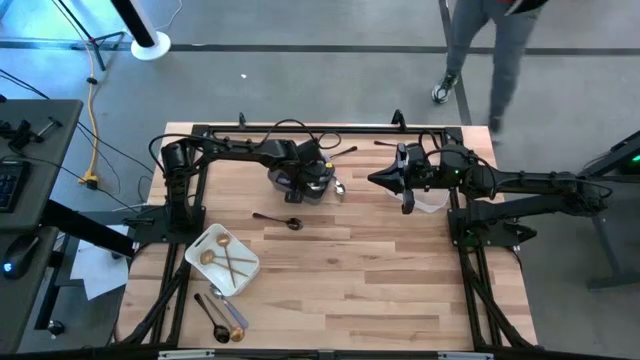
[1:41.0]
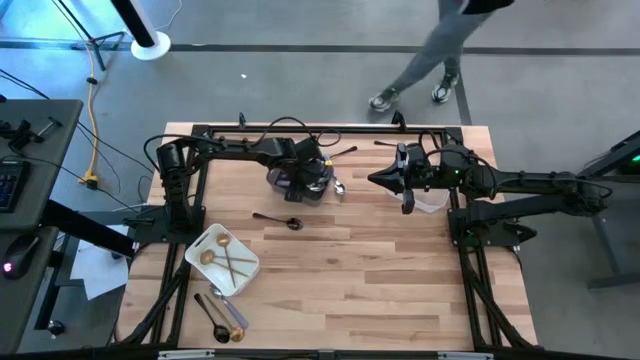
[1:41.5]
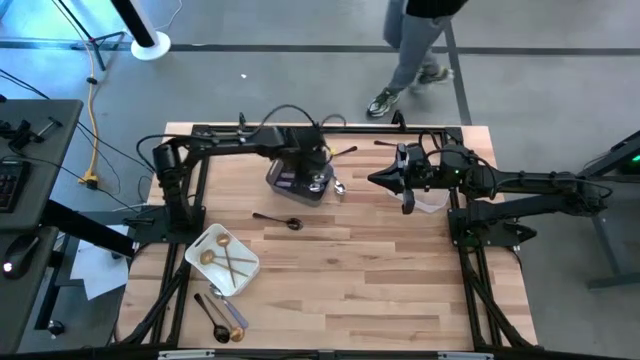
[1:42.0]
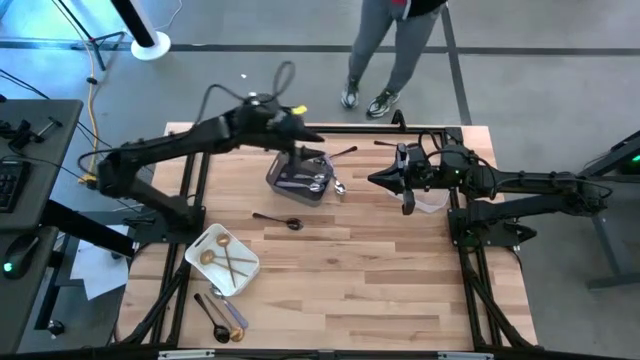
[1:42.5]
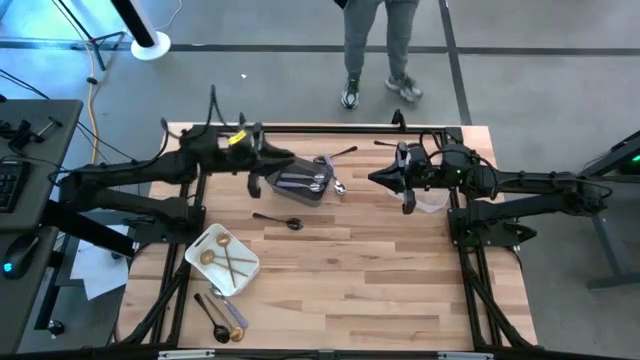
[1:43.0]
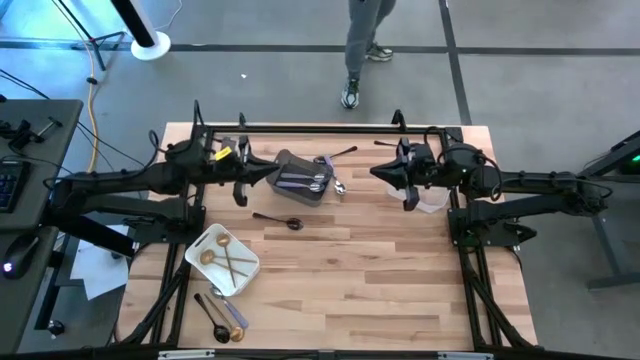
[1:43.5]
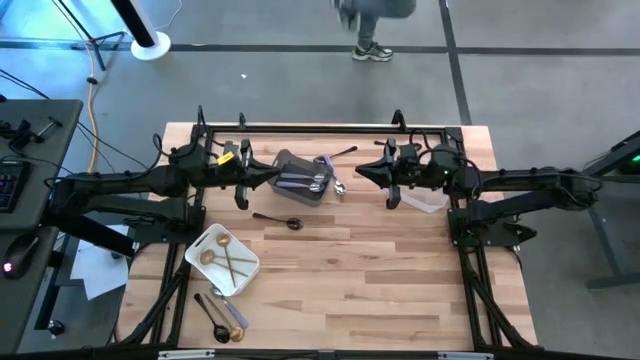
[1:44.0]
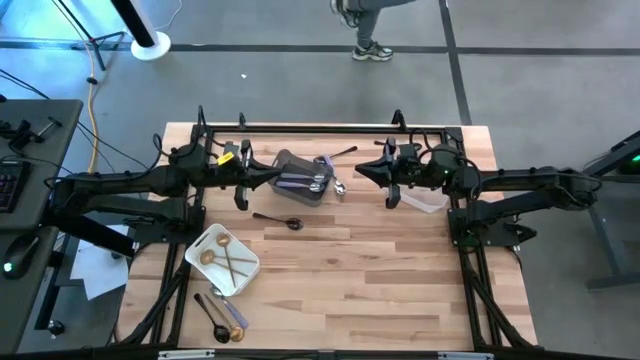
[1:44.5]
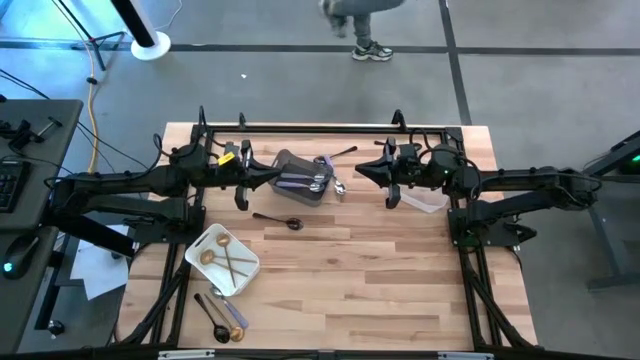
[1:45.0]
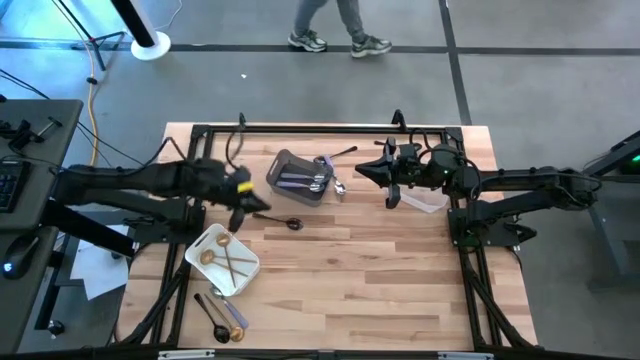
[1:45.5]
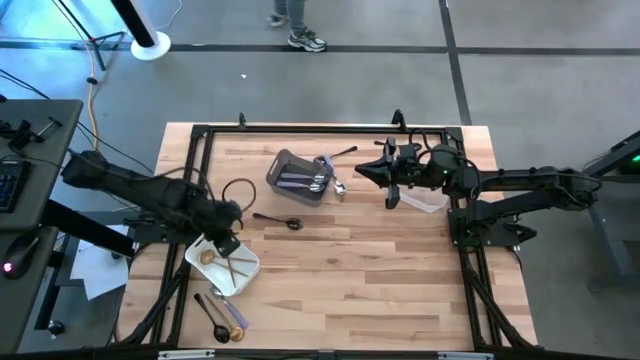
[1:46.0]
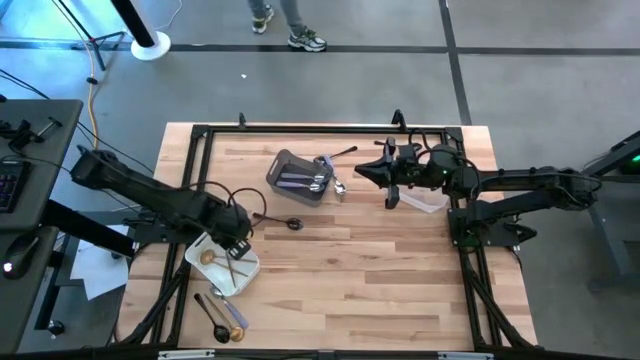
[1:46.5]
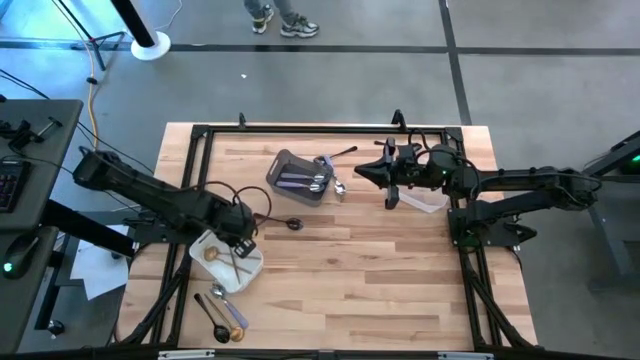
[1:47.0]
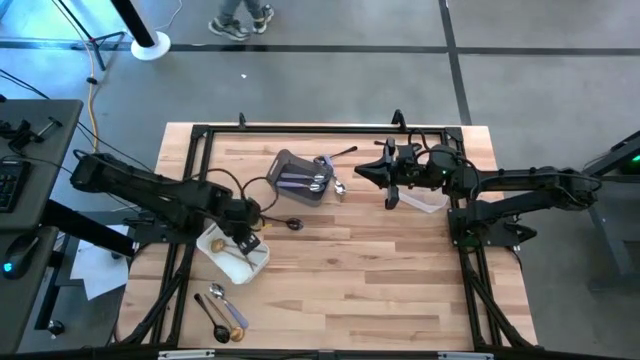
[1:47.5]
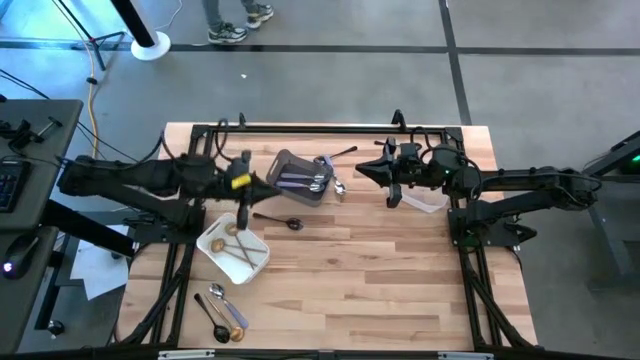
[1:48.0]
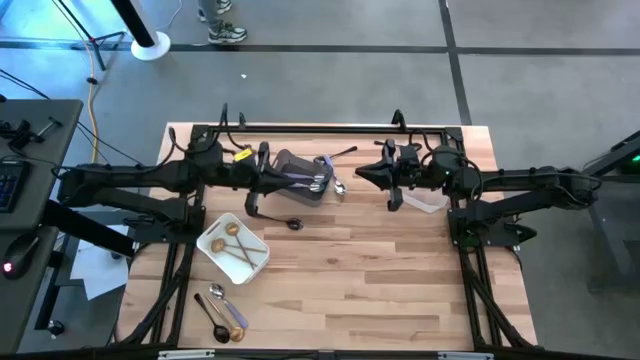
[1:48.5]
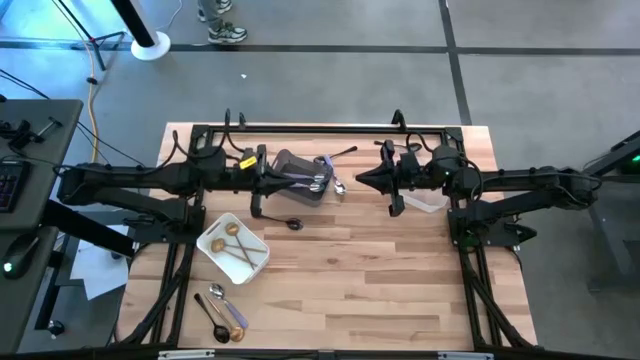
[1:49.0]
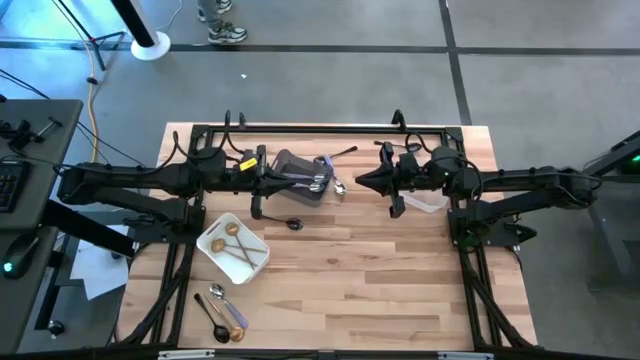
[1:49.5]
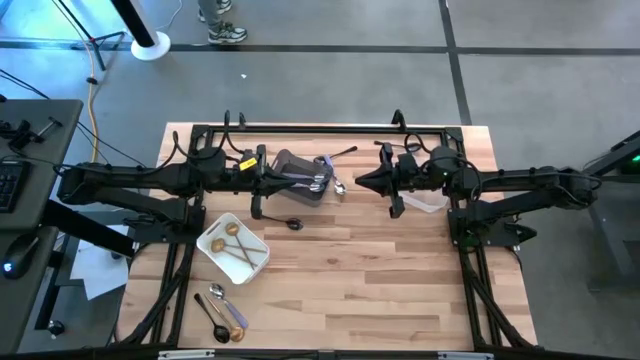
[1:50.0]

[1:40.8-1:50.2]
Task: Sort silverware by color (type)
Adjust the white bin

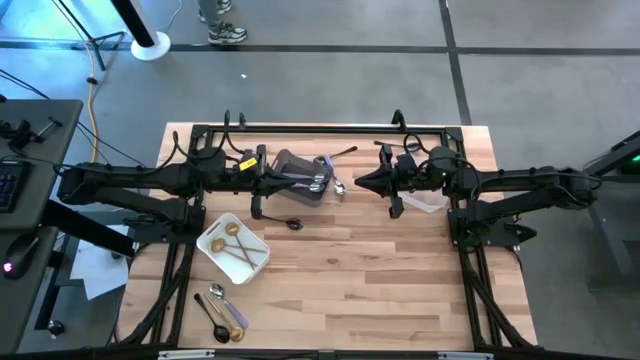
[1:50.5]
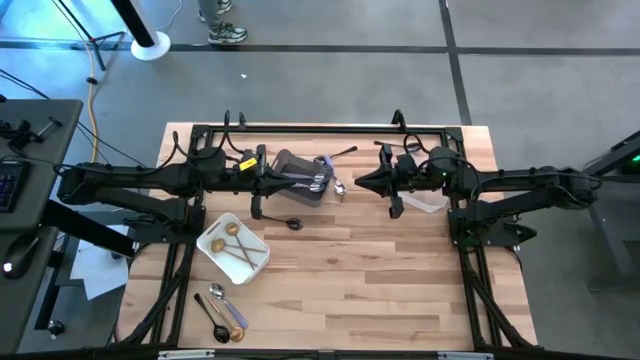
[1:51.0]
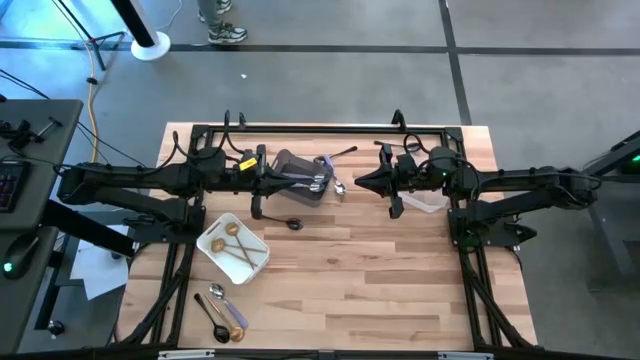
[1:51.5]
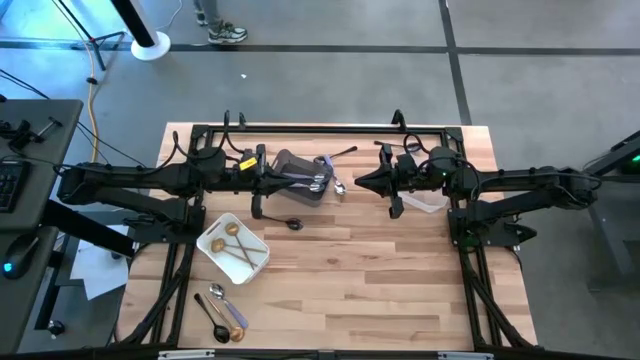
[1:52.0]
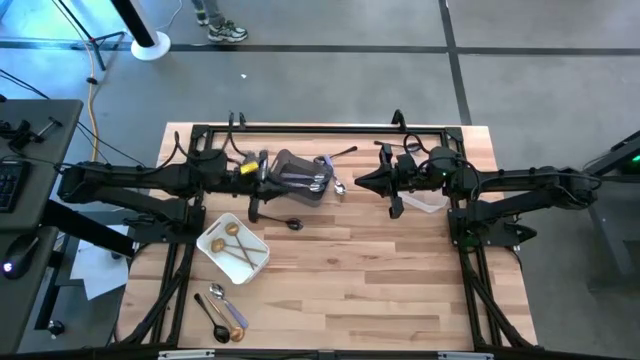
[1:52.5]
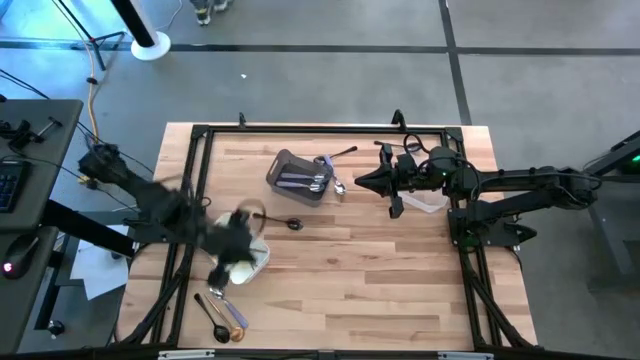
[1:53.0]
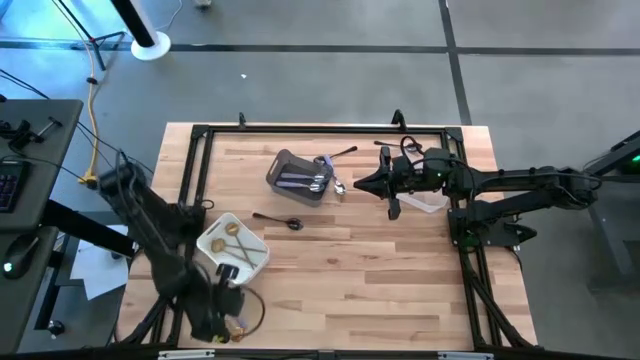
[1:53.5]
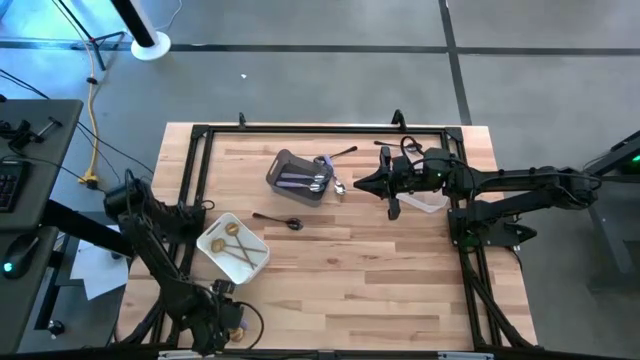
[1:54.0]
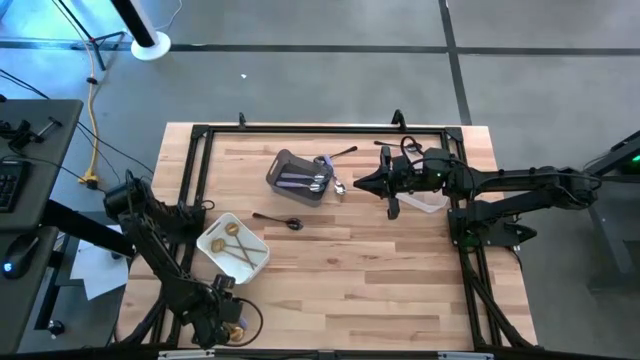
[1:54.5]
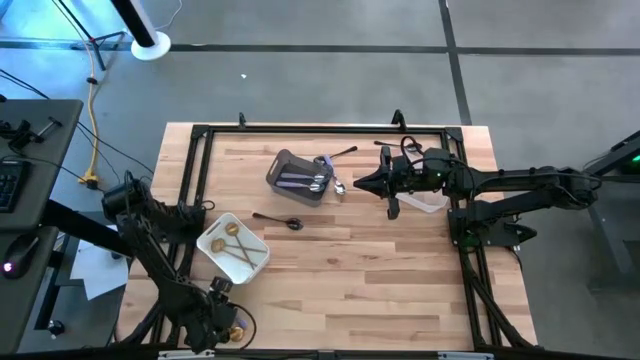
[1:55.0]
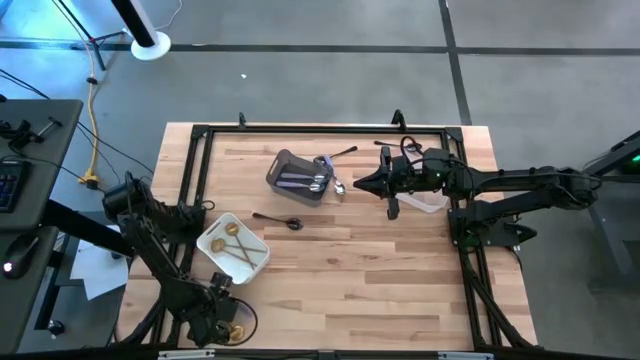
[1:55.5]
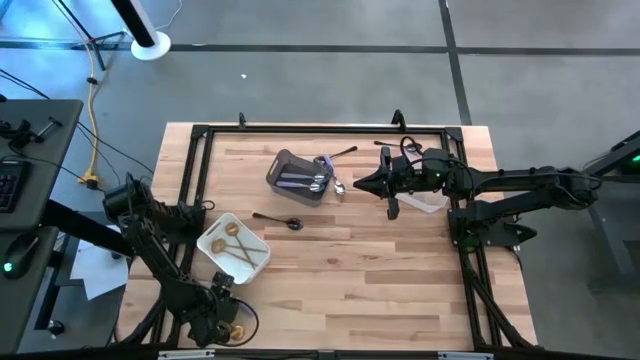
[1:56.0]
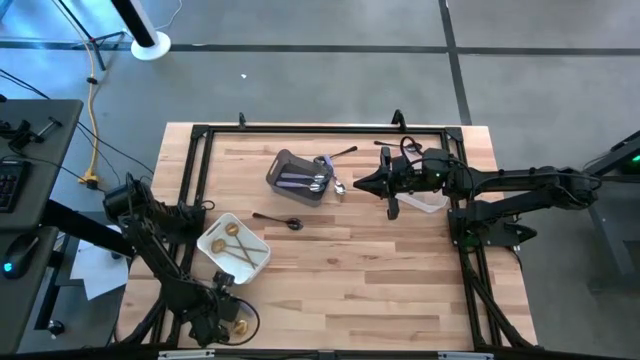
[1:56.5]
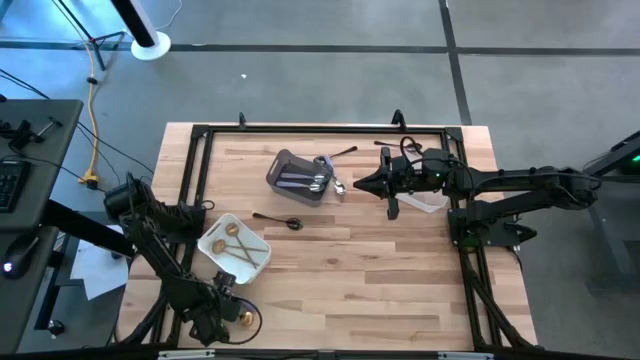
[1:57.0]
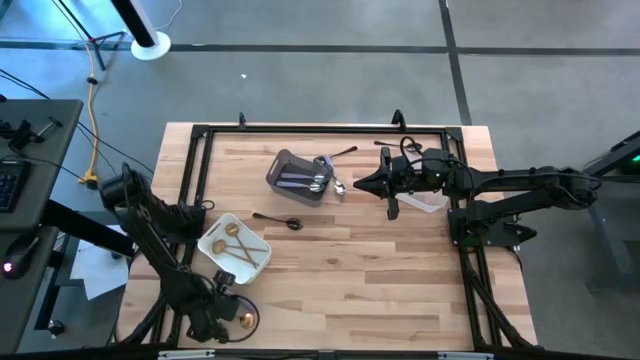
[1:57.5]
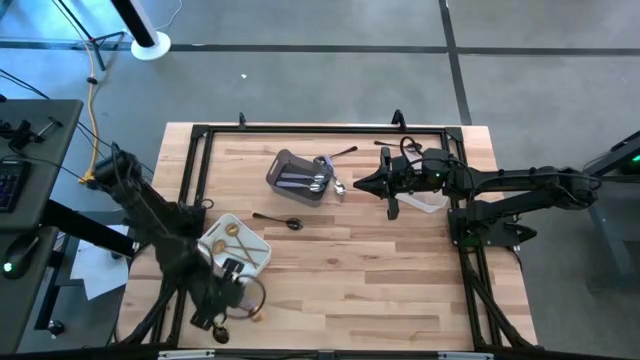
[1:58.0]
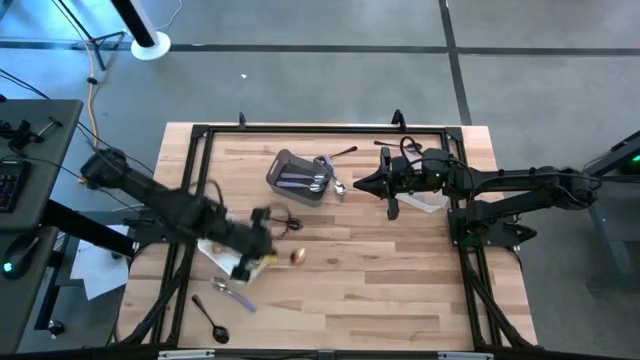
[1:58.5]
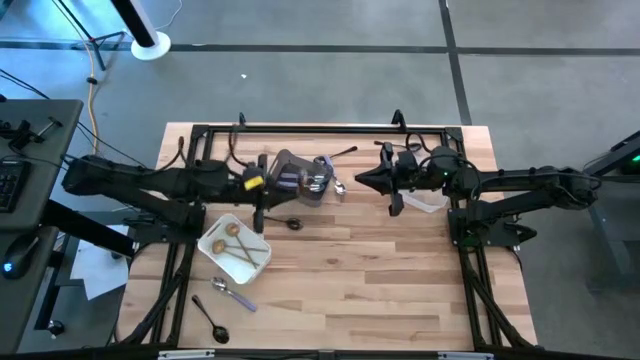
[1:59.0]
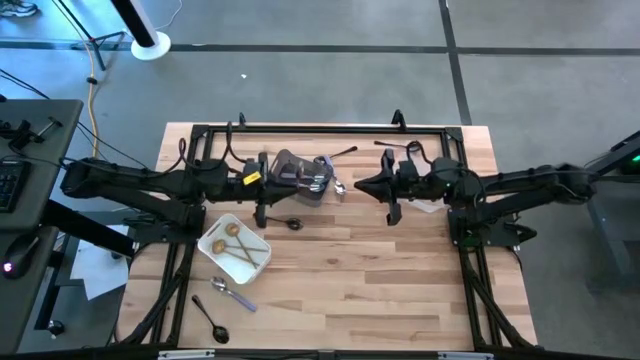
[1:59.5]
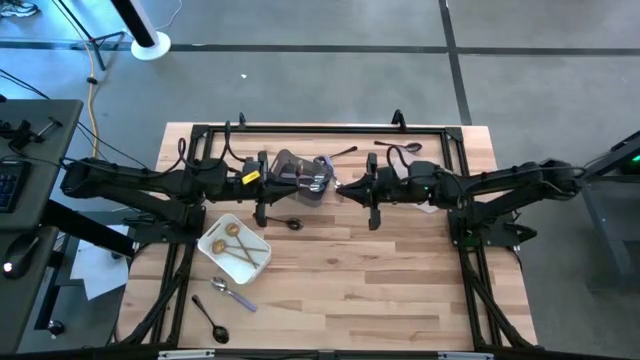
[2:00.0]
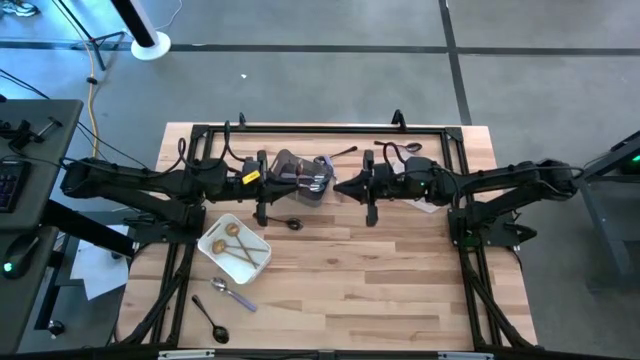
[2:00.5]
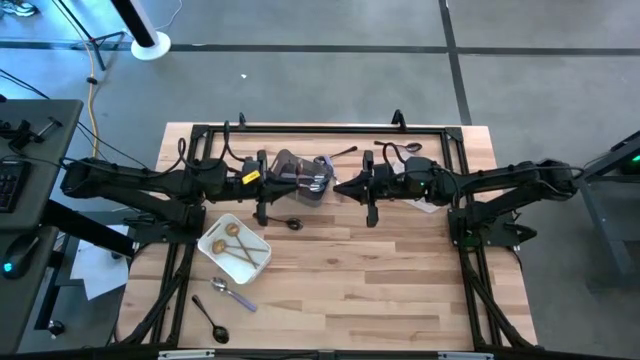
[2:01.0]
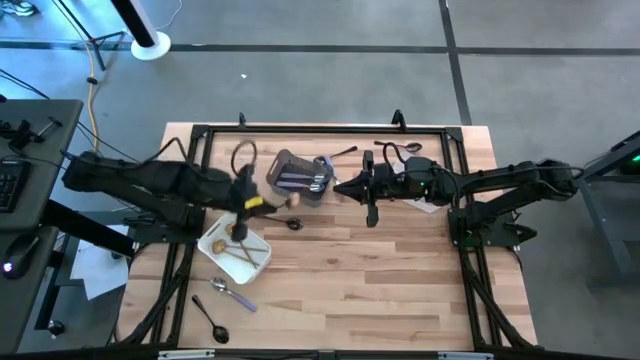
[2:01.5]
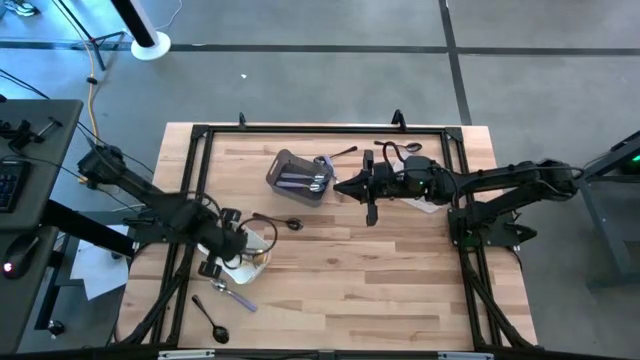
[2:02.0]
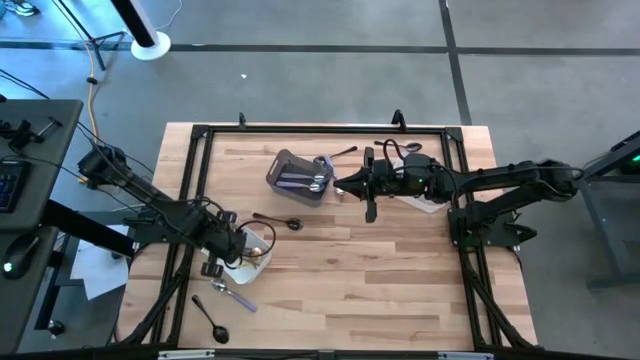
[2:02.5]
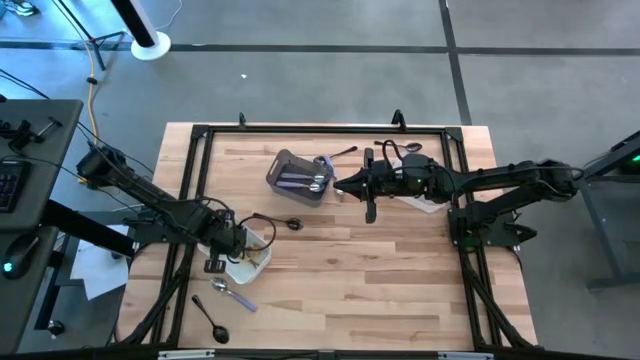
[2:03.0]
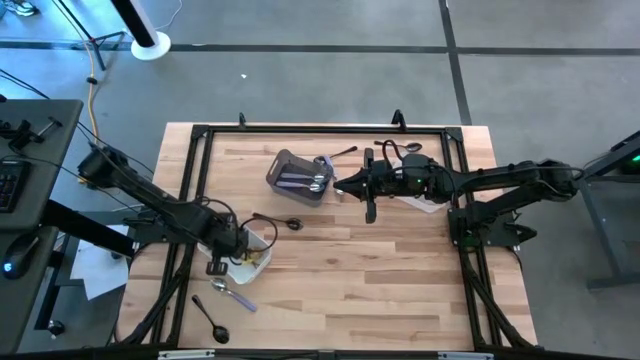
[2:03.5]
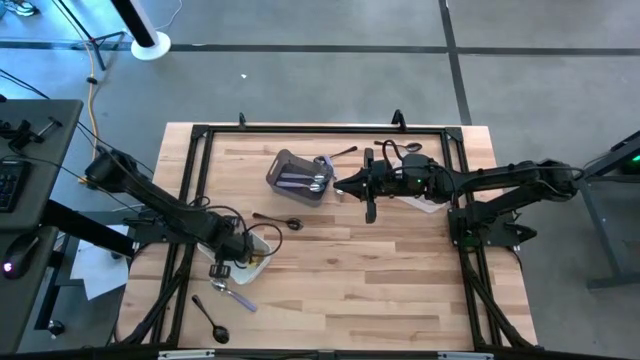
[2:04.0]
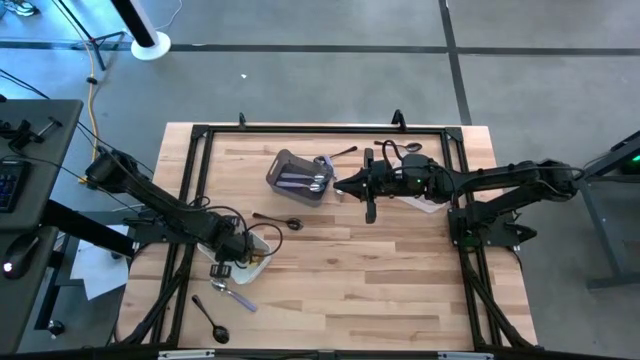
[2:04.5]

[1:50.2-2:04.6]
Put the gold spoon into the white bin
